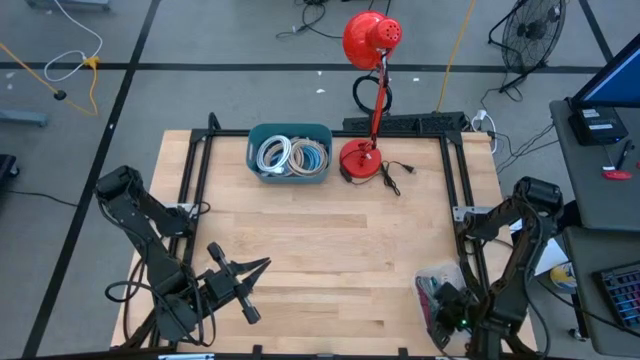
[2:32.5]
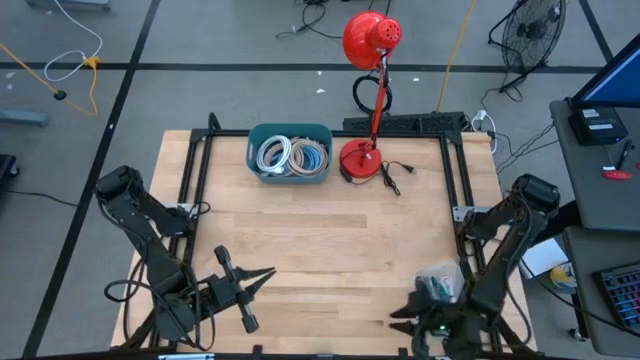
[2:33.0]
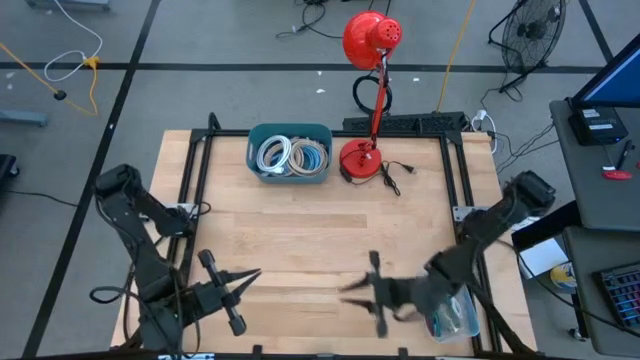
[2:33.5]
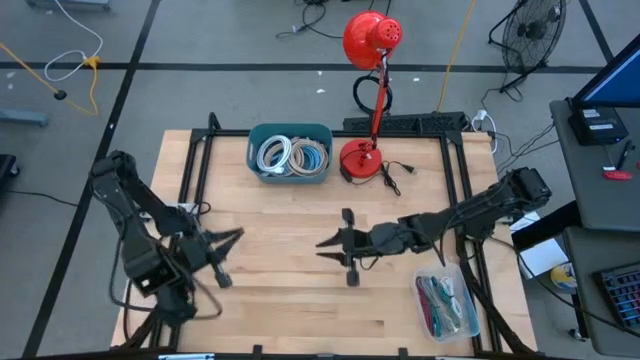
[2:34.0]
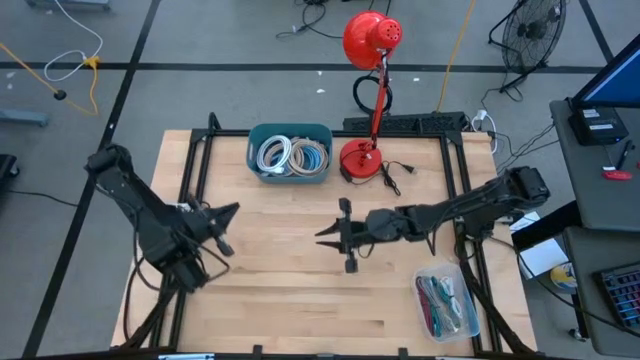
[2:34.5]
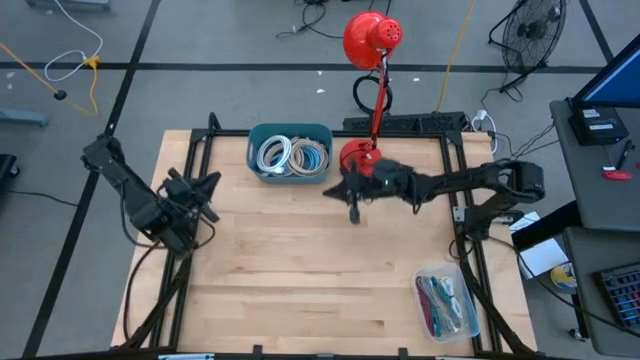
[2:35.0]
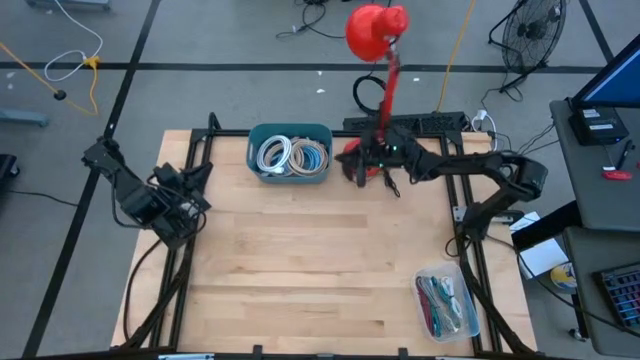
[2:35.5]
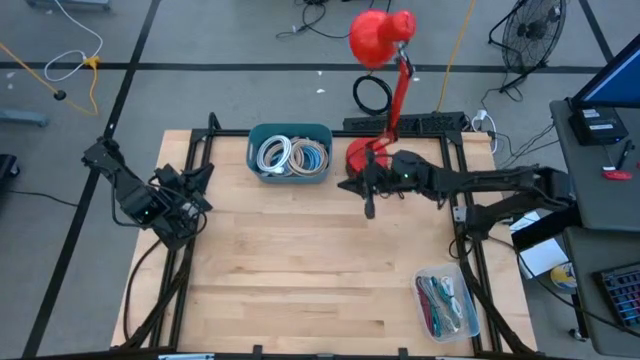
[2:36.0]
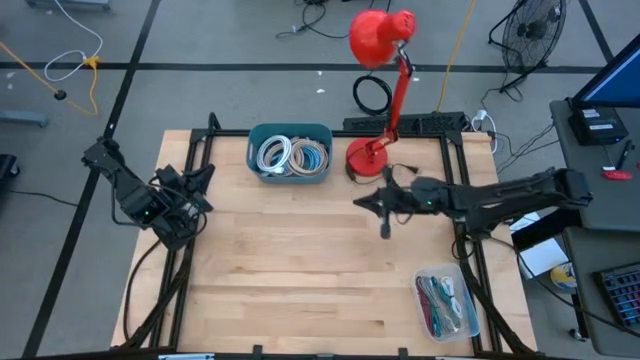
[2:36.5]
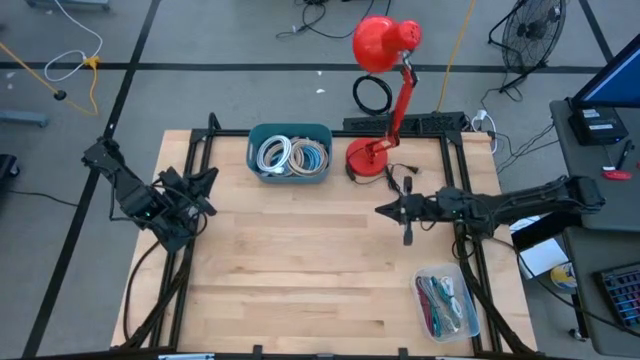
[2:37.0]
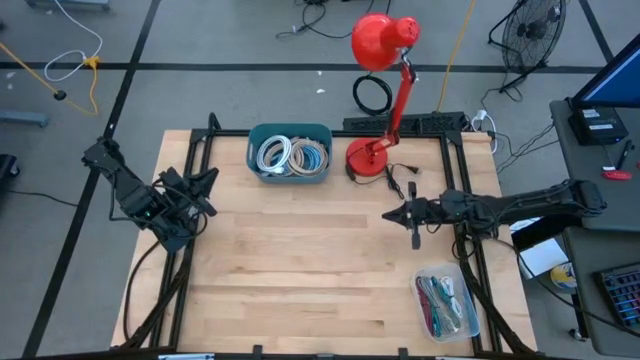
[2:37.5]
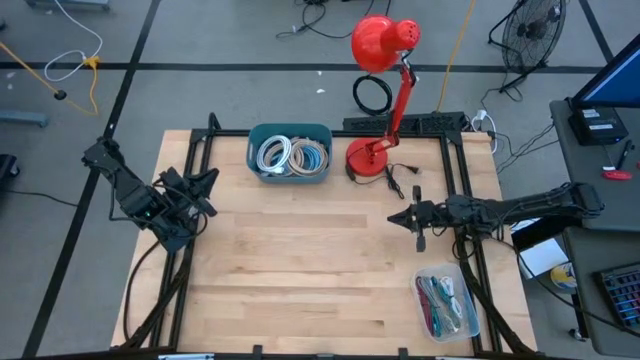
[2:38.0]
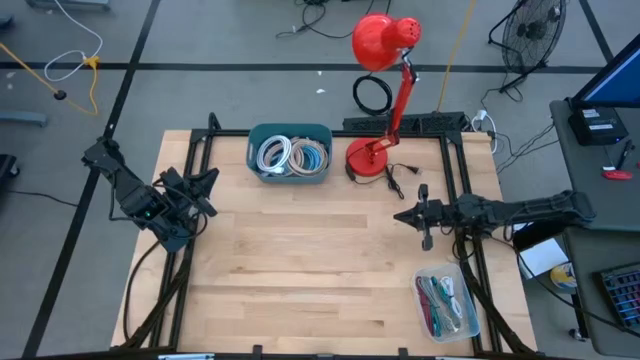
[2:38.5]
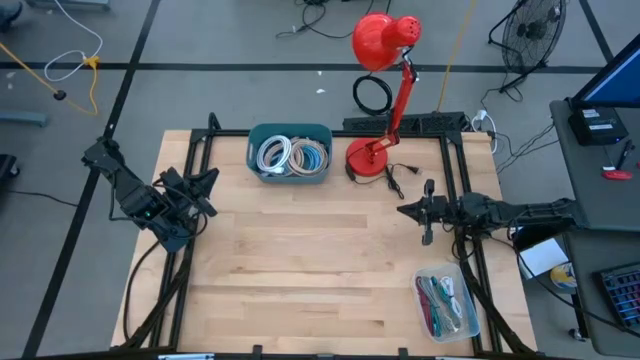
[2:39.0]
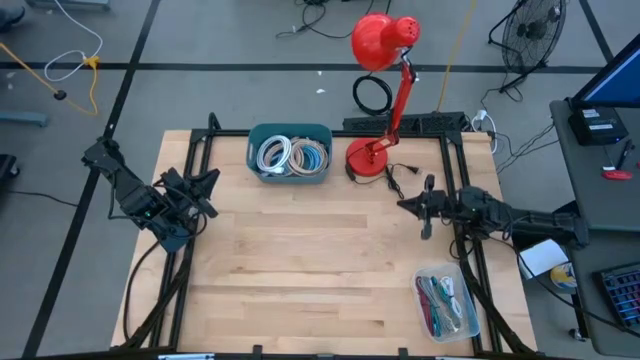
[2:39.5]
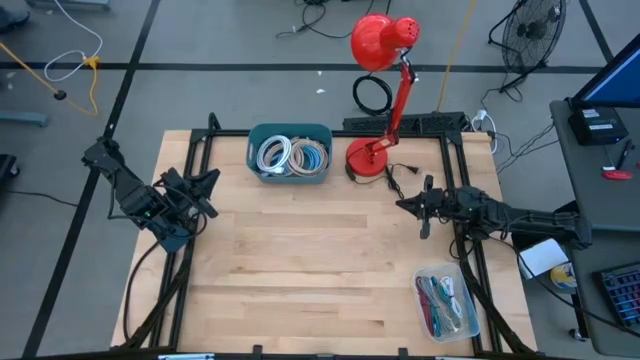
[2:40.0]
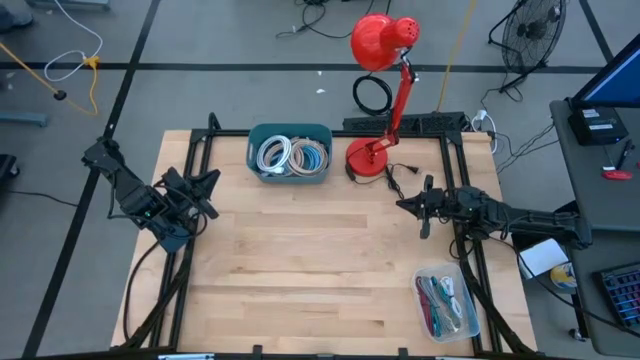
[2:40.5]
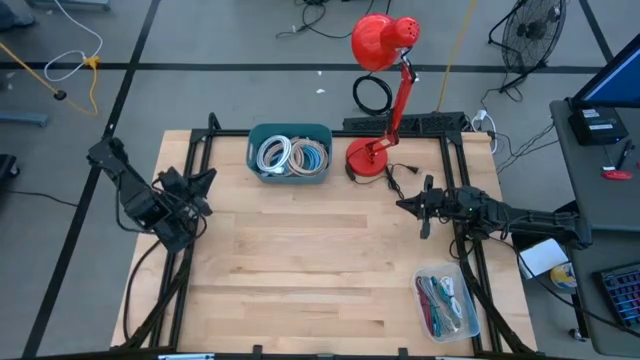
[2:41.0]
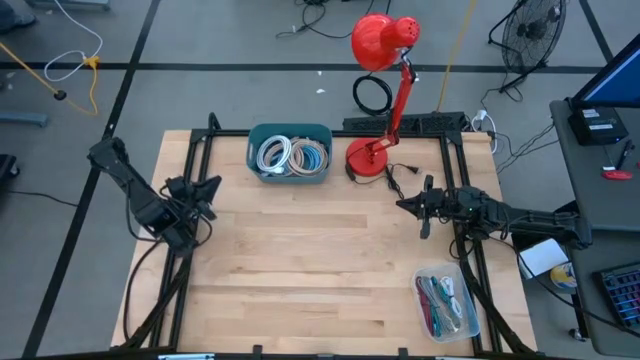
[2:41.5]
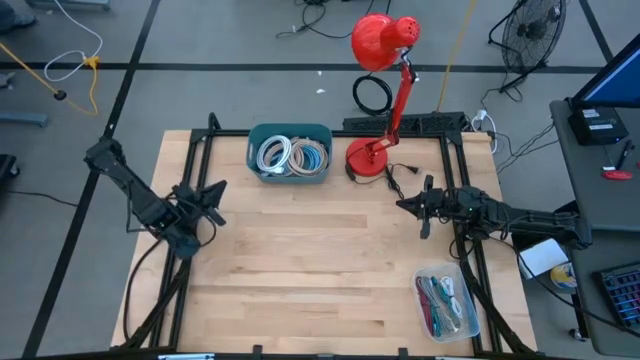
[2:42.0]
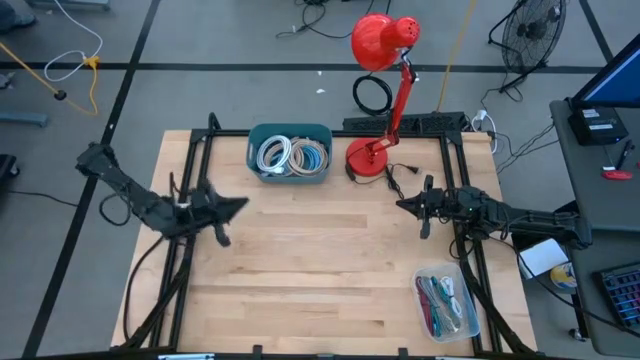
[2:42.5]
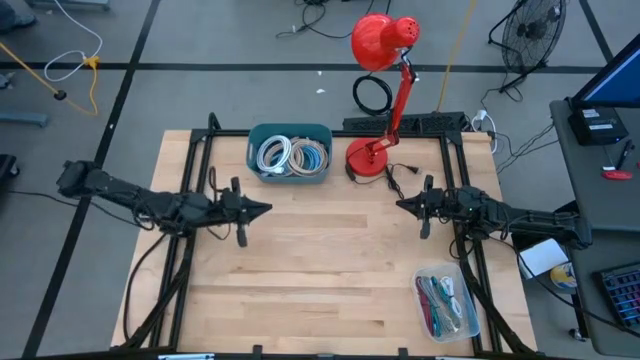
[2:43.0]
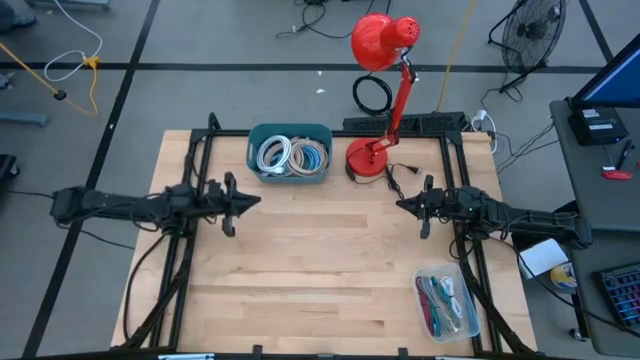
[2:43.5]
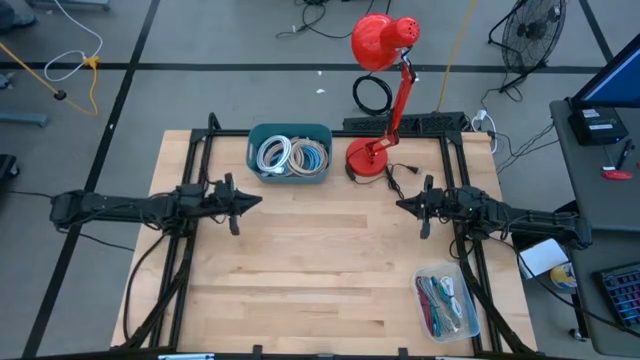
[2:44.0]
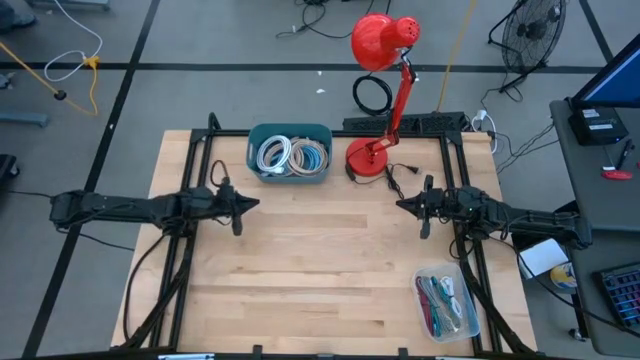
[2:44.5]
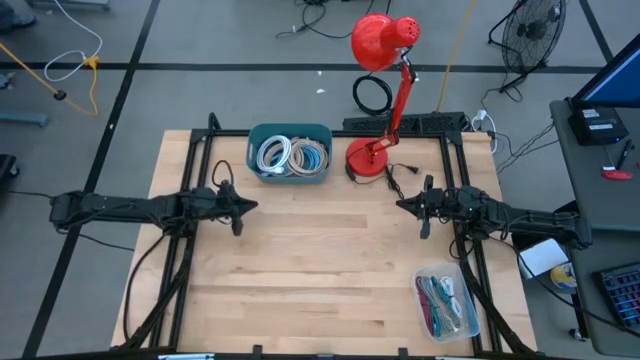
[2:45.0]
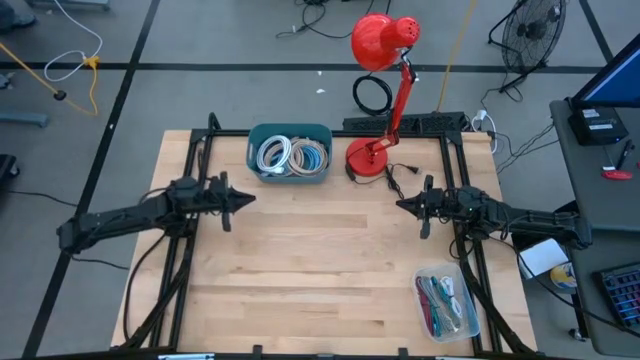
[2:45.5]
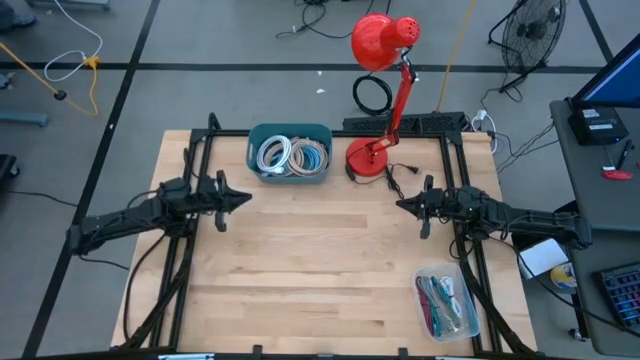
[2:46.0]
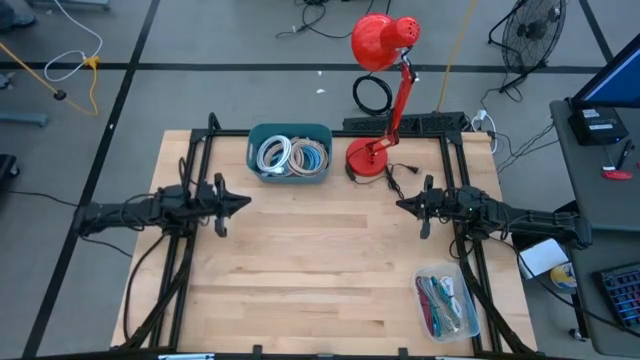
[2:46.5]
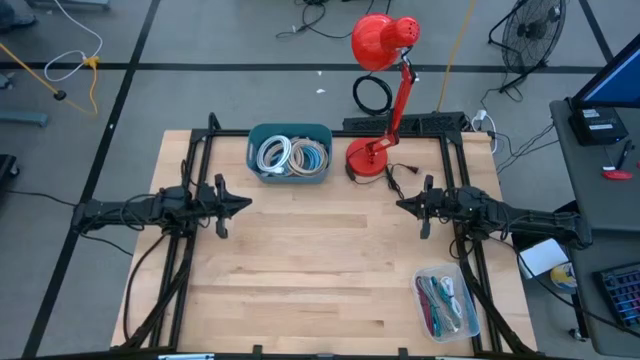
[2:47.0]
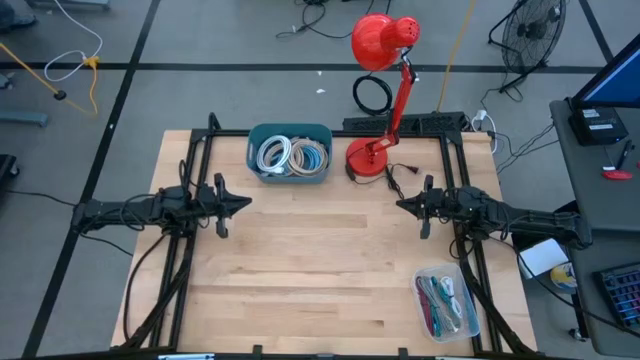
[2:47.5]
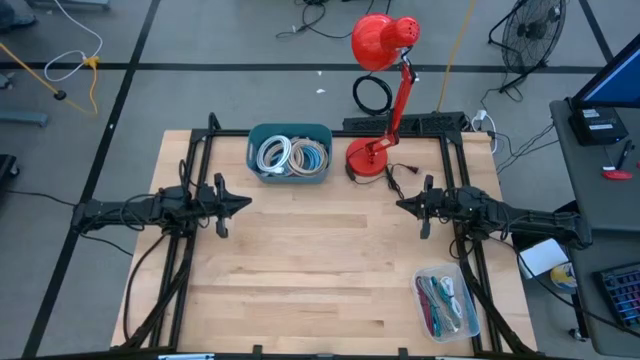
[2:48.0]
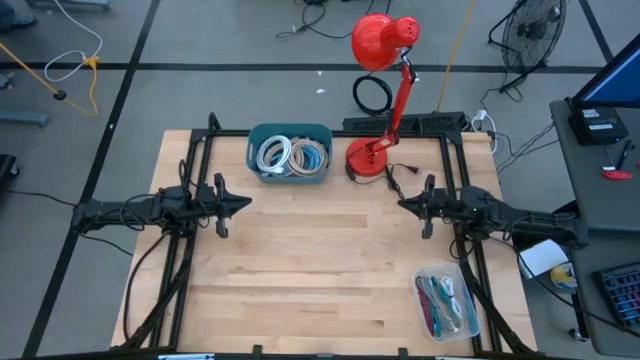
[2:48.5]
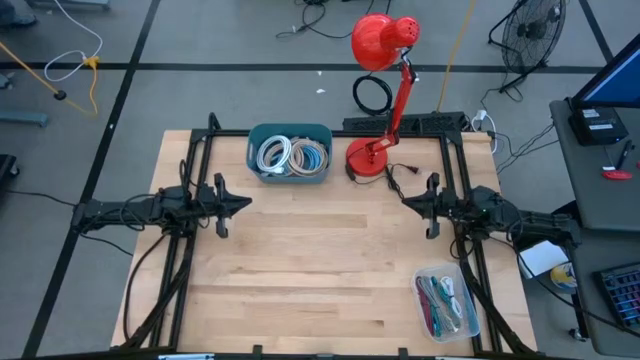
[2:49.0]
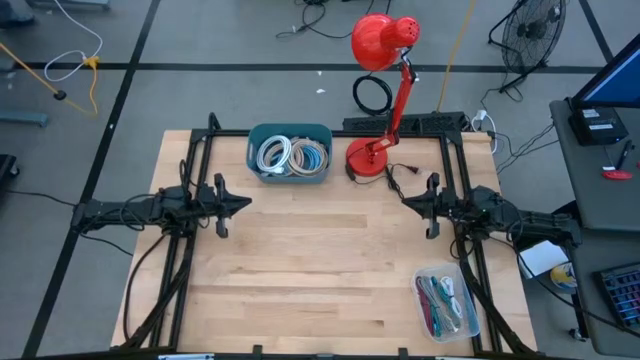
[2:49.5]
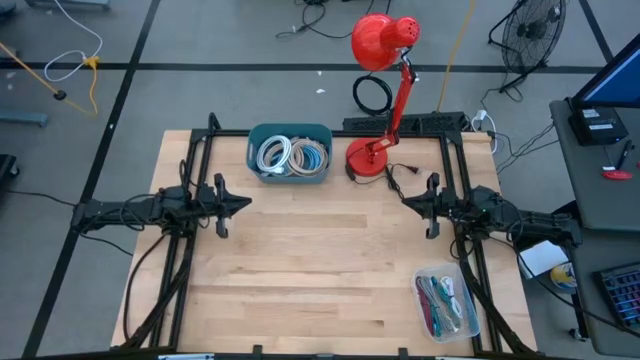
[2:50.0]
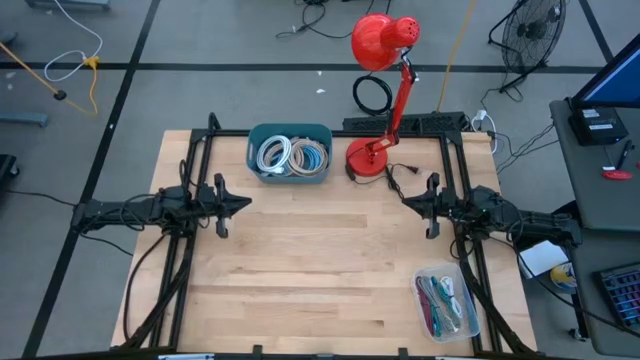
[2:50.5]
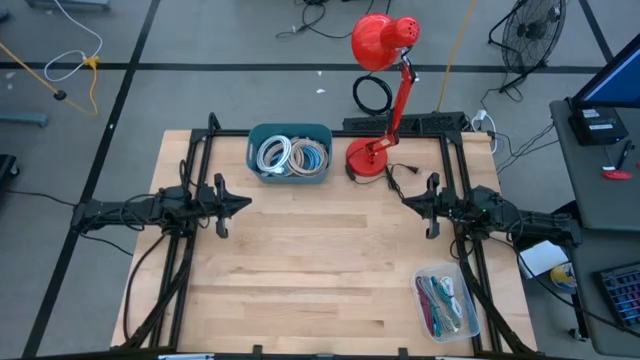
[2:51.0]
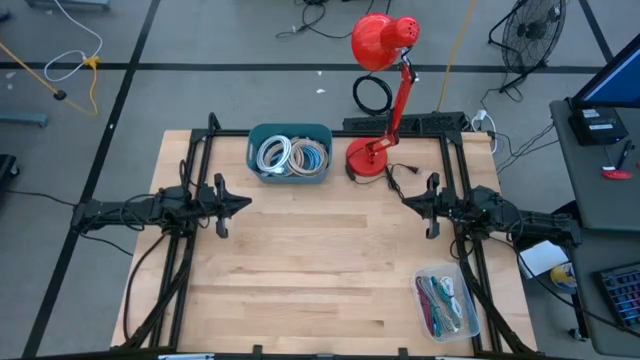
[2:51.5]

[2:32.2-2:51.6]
Task: Pick & Place USB Port
Return to Home Position

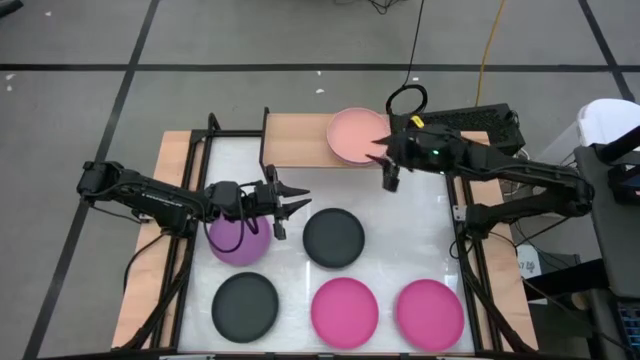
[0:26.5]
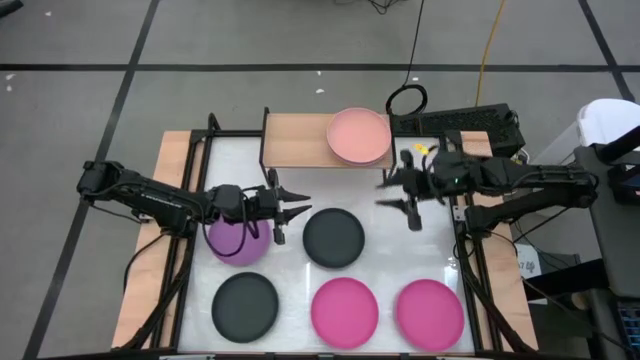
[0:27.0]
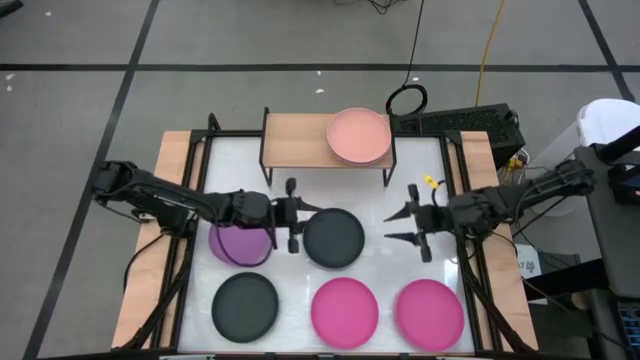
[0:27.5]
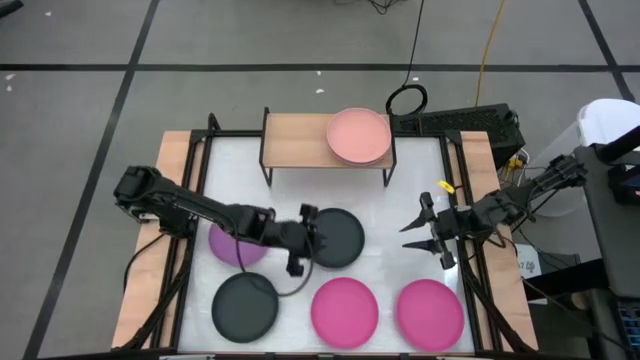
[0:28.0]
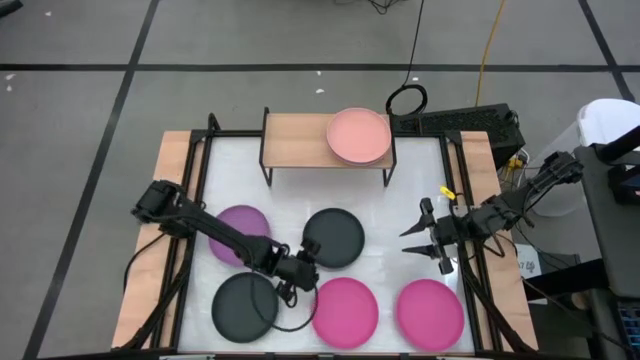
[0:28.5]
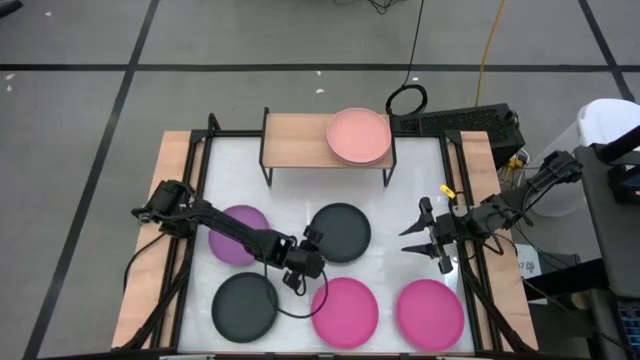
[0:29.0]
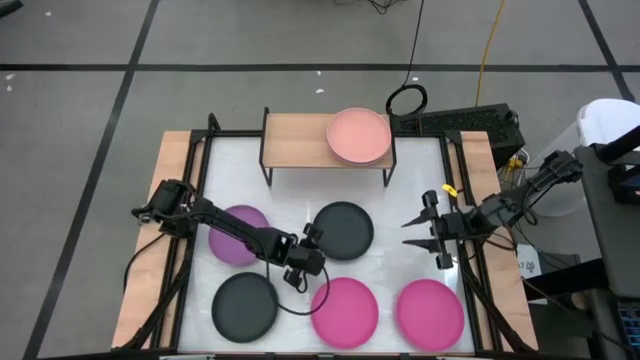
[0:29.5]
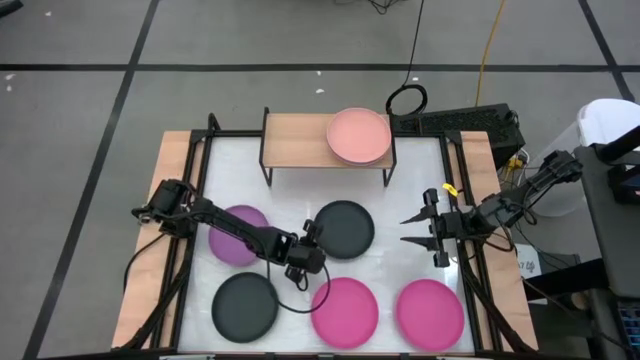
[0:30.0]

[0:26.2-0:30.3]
Task: Place and stack plates onto a shelf
Stack the top black plate on top of the orange plate on the shelf
